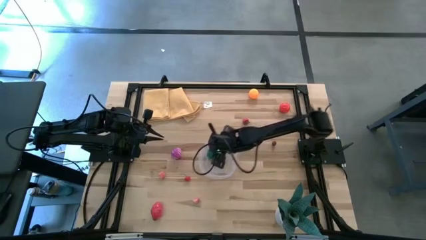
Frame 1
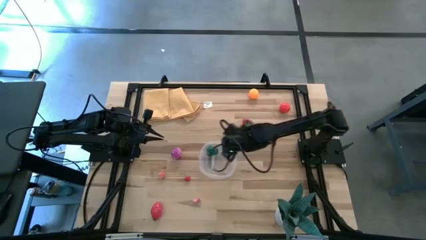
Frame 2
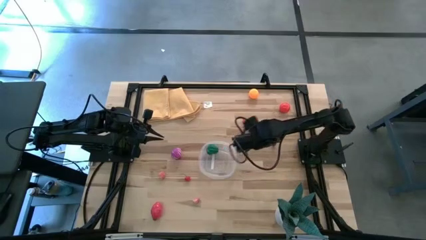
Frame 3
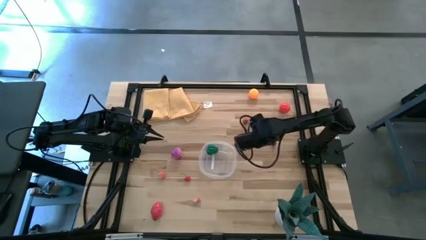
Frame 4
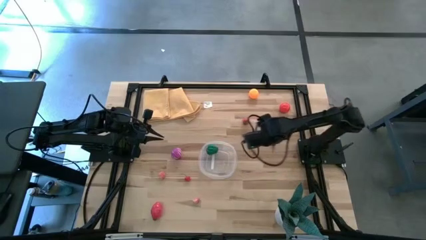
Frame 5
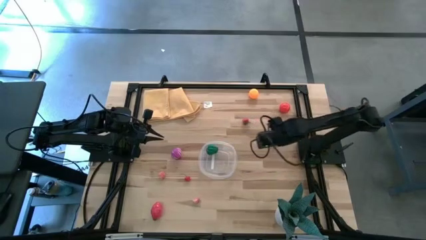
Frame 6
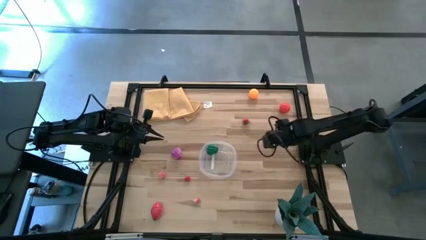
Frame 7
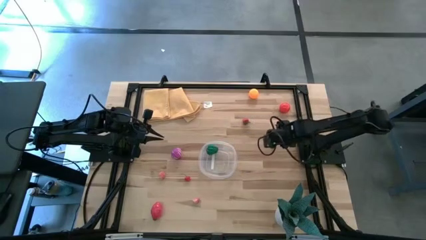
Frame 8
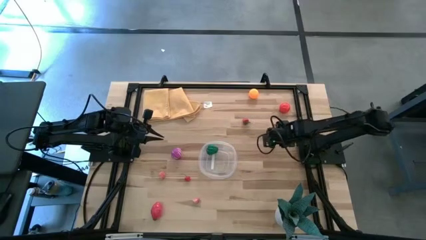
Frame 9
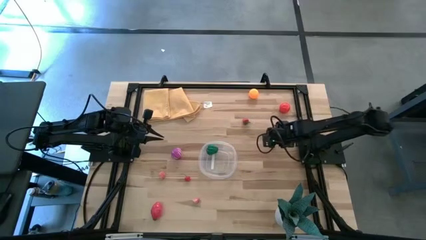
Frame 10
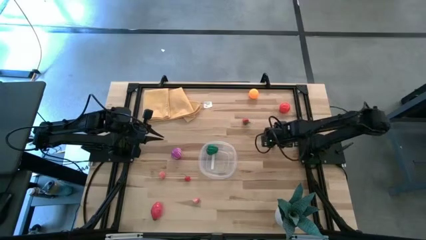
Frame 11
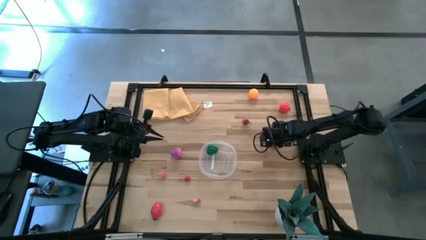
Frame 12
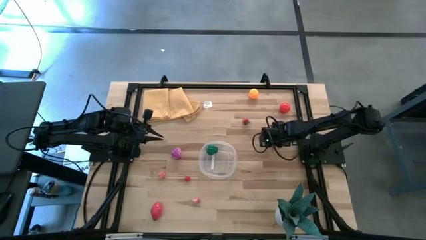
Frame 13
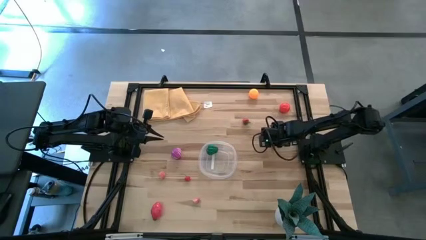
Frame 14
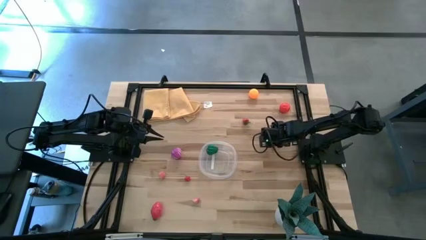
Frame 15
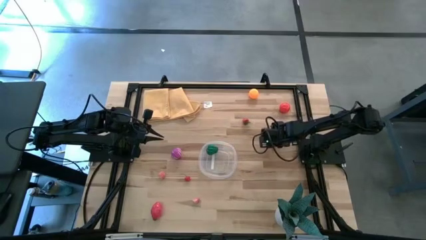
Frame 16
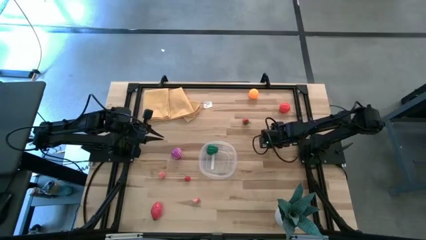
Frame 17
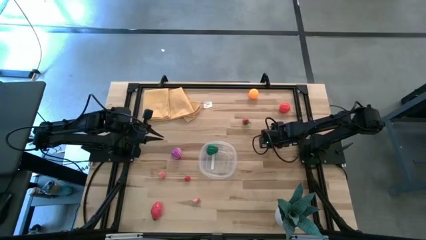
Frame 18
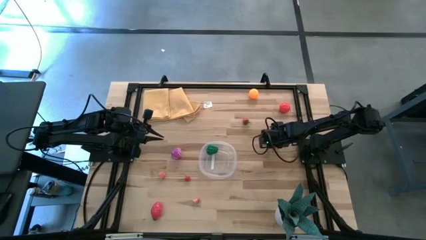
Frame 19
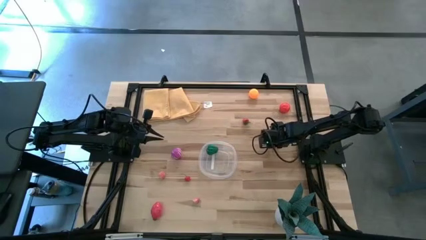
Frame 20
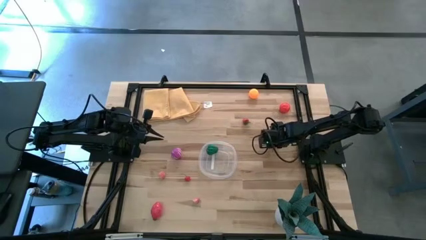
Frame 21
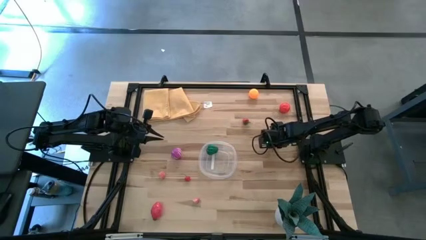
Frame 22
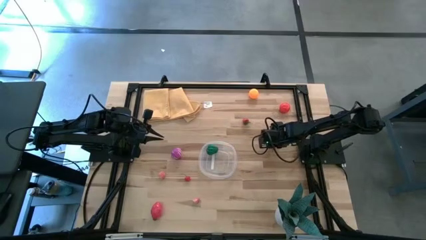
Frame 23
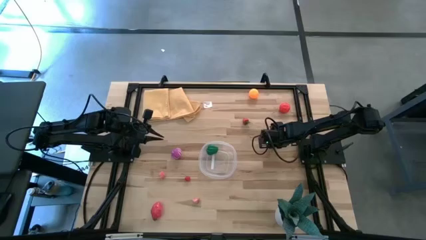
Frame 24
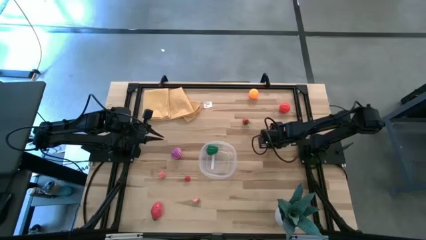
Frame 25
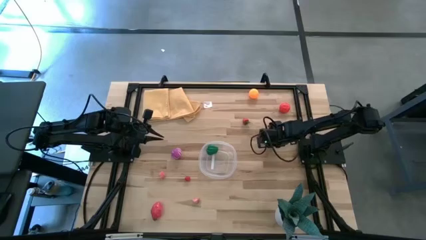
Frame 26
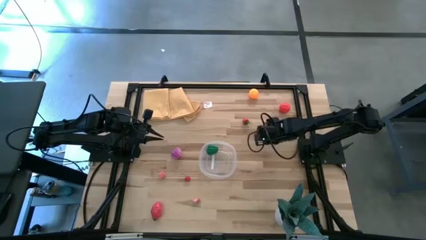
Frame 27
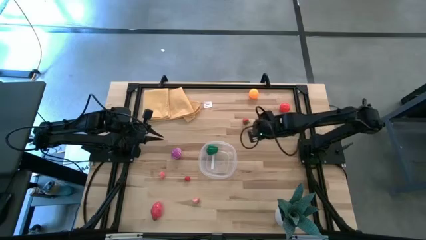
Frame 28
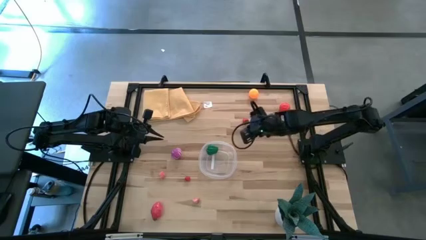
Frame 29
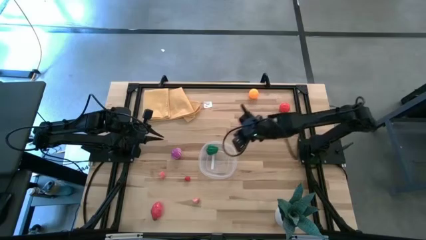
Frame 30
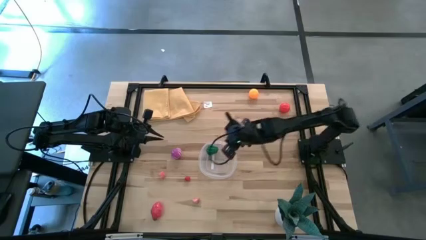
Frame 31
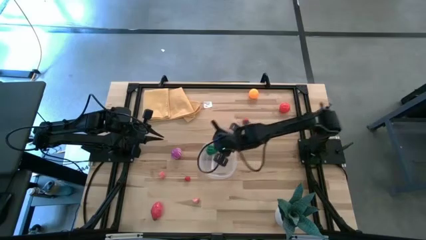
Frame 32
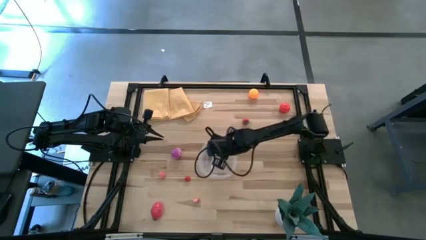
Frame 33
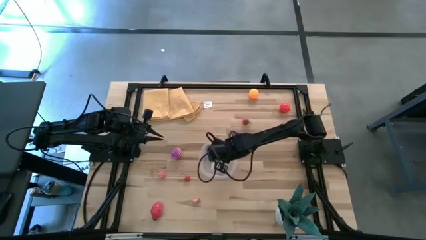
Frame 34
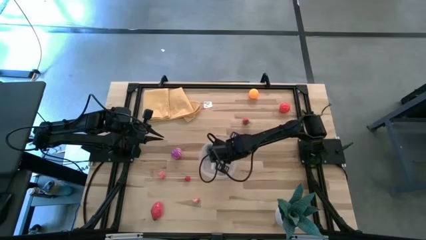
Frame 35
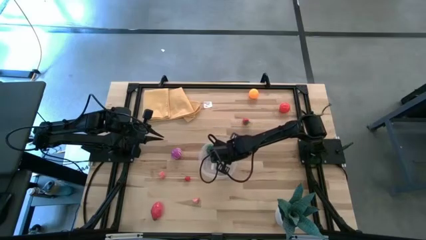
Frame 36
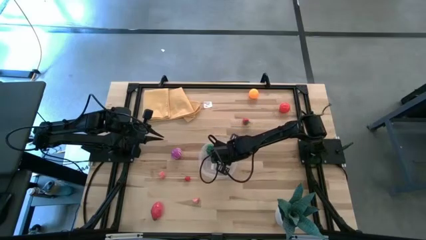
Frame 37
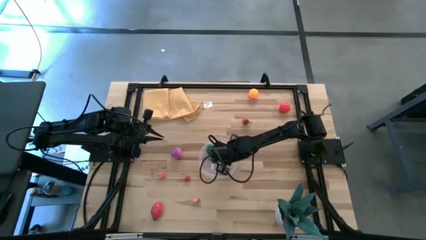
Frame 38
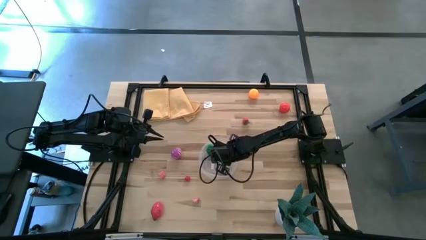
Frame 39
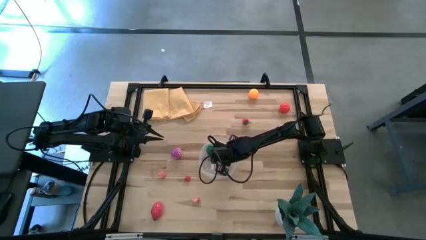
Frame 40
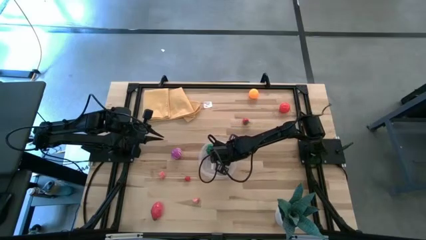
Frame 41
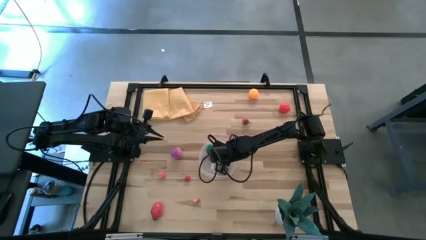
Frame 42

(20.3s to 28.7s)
Task: Pick and placing Produce into tupperware
Put the top red cherry into the transparent bin

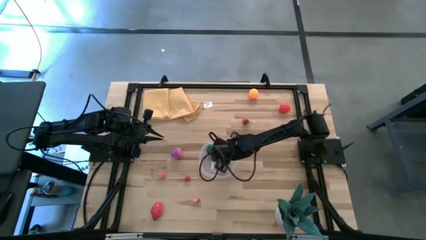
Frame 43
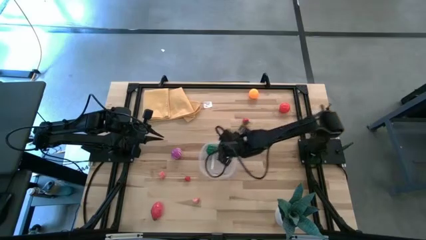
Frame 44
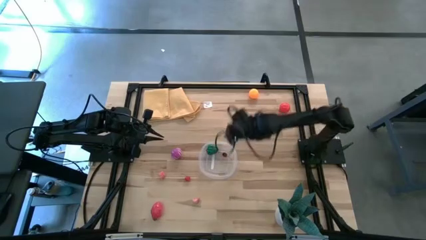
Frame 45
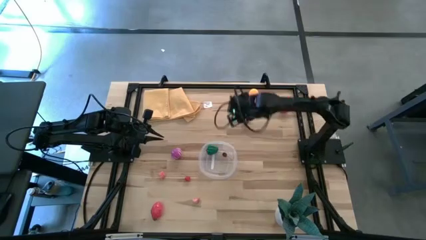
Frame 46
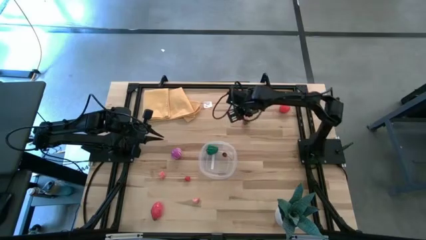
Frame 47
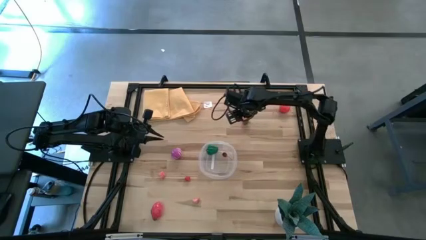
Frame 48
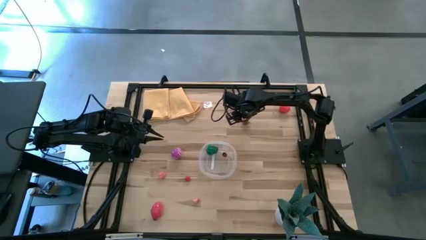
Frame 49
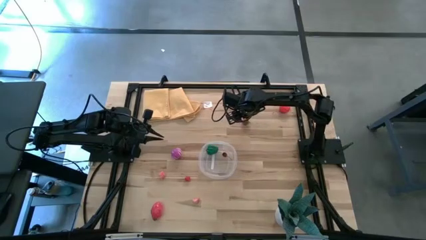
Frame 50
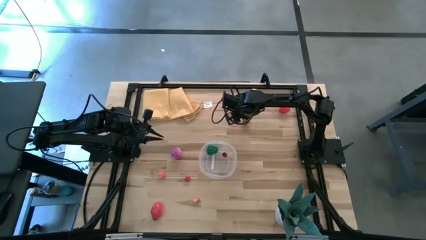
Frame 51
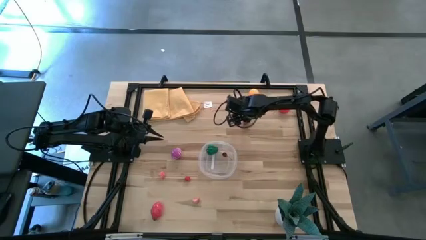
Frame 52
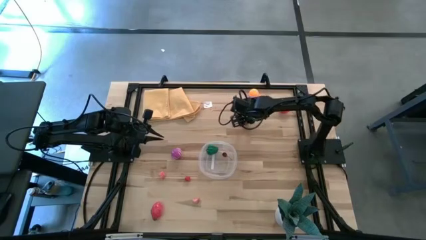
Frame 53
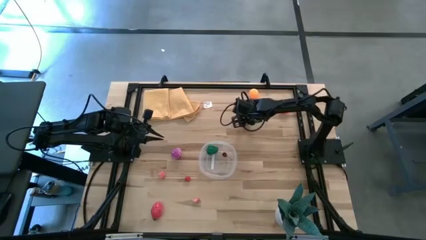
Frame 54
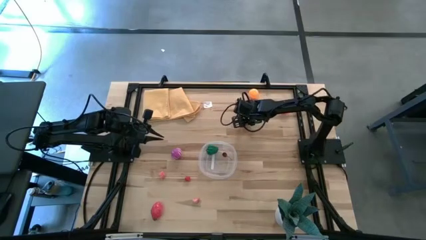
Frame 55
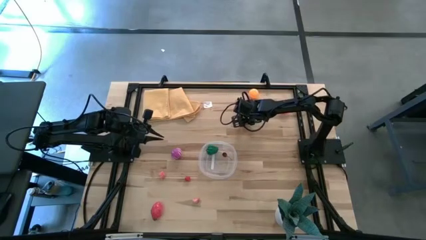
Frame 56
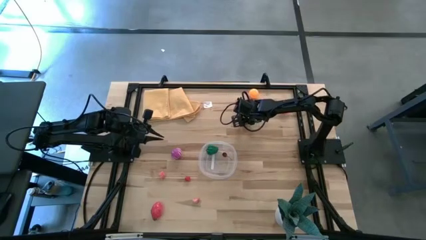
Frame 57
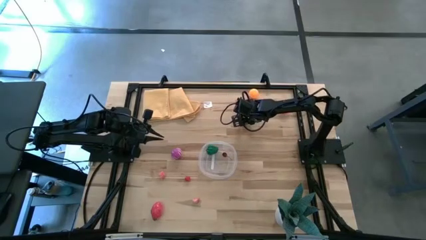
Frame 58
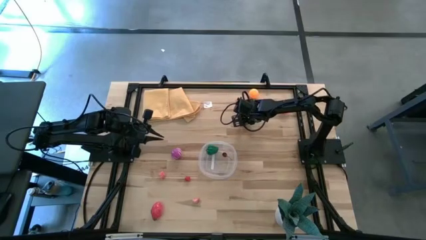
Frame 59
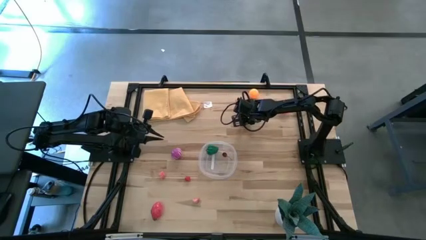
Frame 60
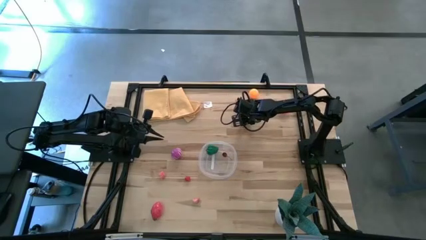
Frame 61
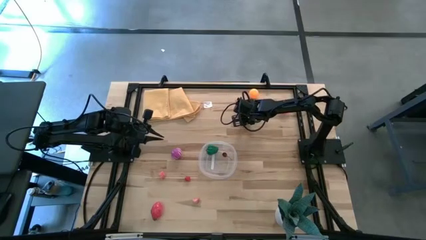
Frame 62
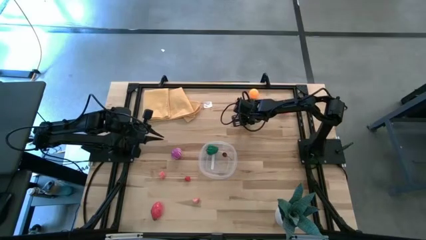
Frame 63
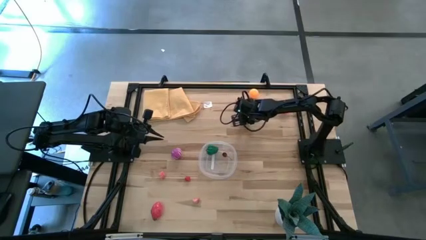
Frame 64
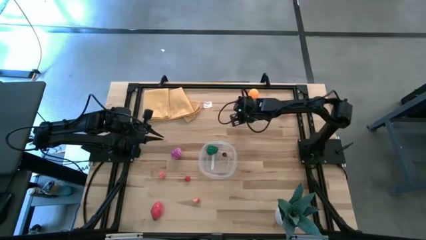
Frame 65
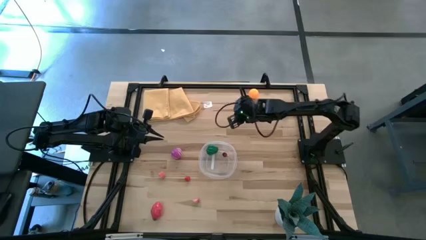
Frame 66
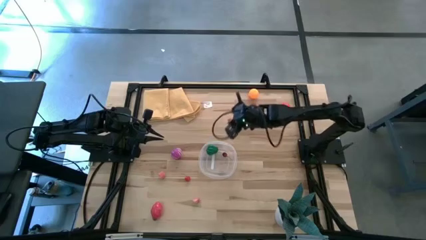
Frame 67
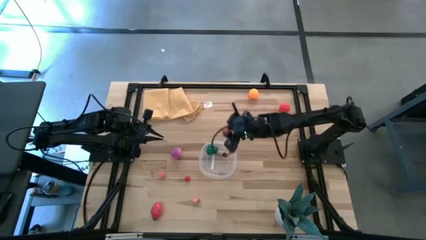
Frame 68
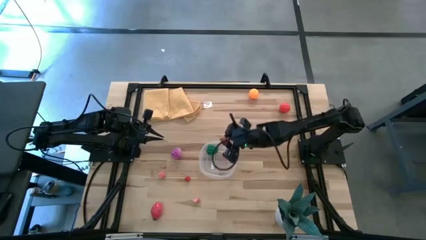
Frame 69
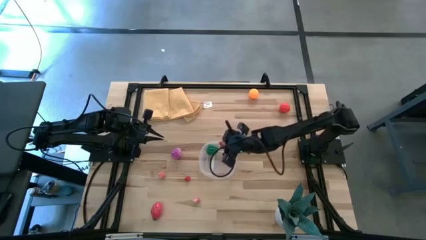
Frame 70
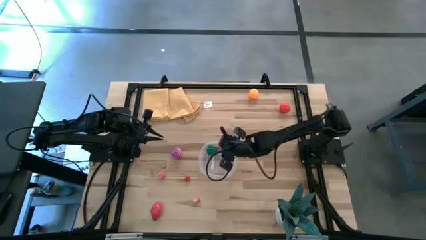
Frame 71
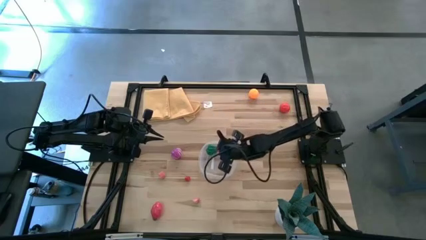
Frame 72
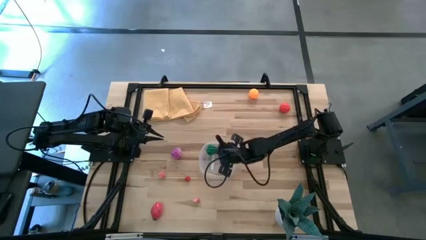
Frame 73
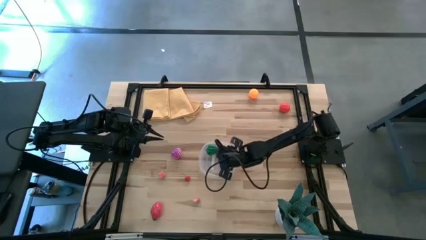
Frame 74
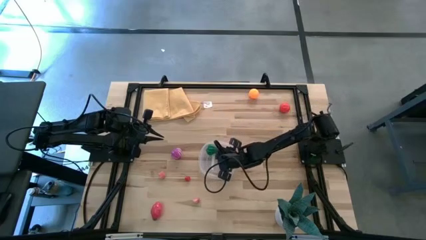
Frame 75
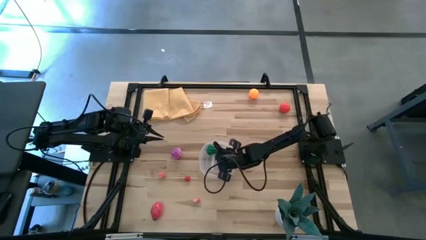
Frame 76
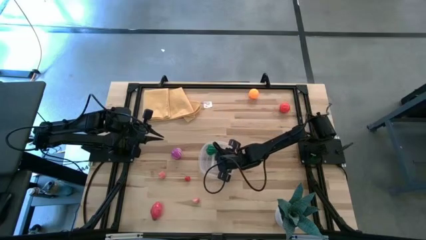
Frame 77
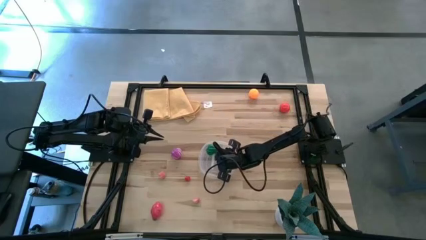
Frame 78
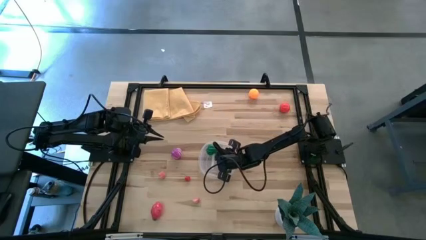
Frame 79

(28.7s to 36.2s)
Put the red strawberry into the transparent bin

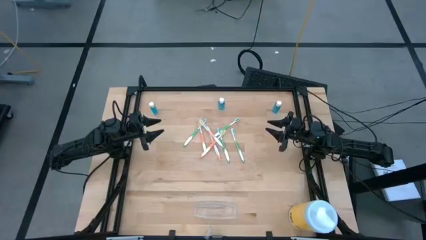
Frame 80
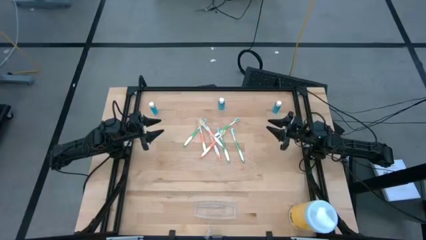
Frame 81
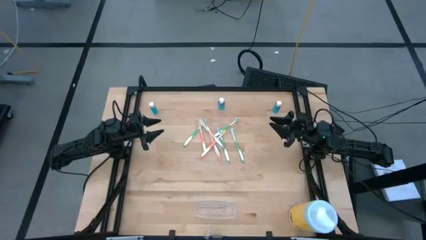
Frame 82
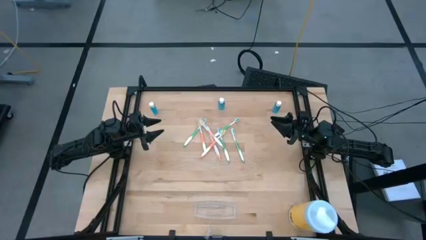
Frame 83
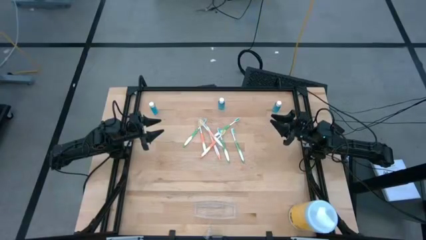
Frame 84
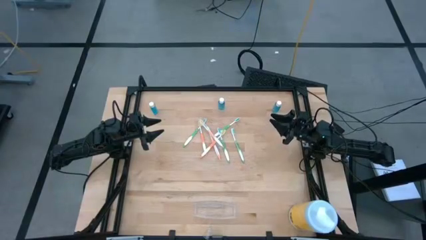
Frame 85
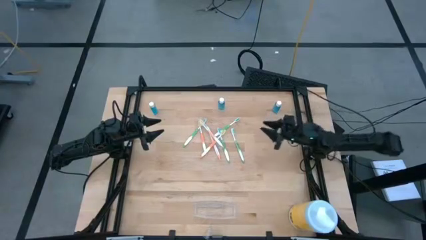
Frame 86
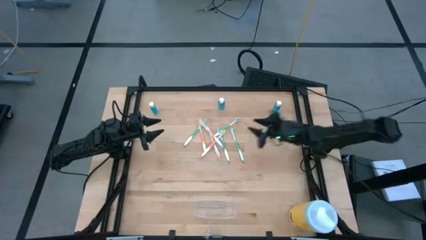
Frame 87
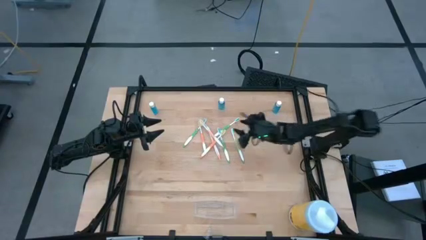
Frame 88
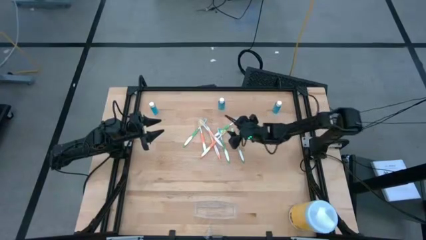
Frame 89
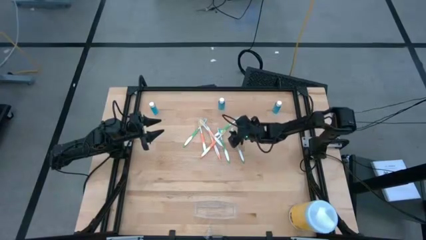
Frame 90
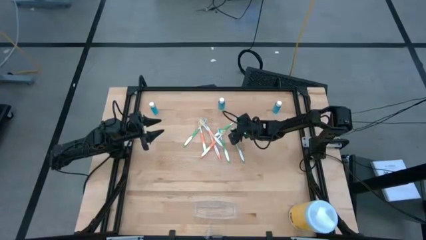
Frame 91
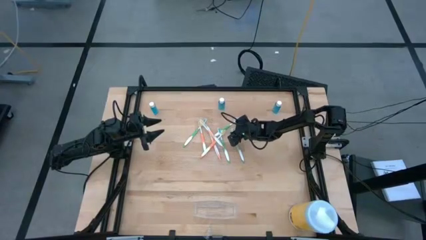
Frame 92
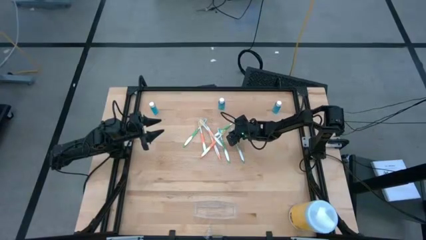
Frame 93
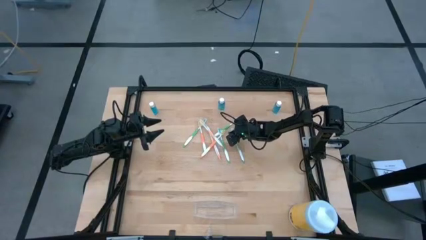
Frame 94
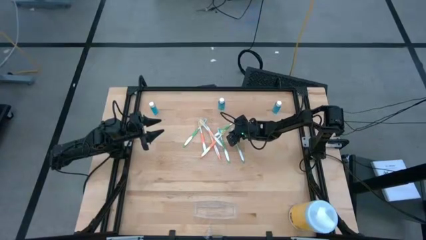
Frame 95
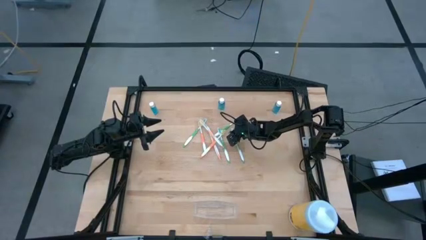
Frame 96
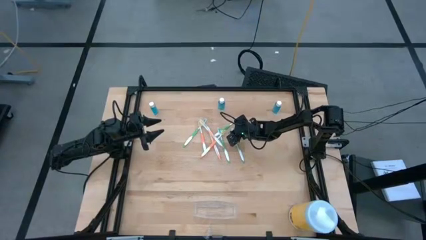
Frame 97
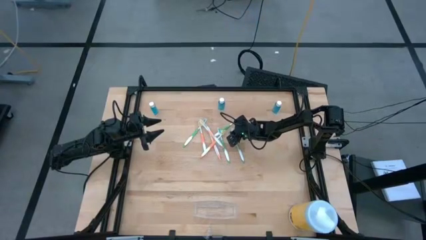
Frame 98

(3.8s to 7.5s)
Task: Pick & Place toothbrushing station
Put the green toothbrush into the transparent organizer
